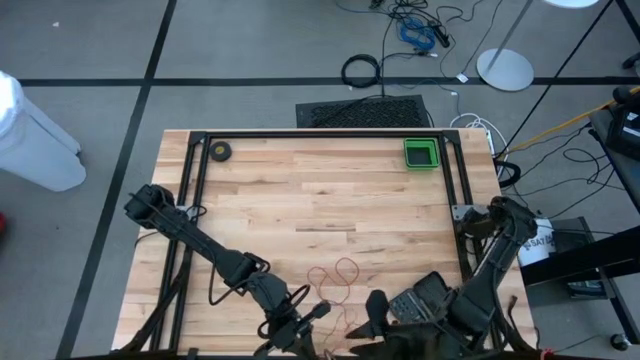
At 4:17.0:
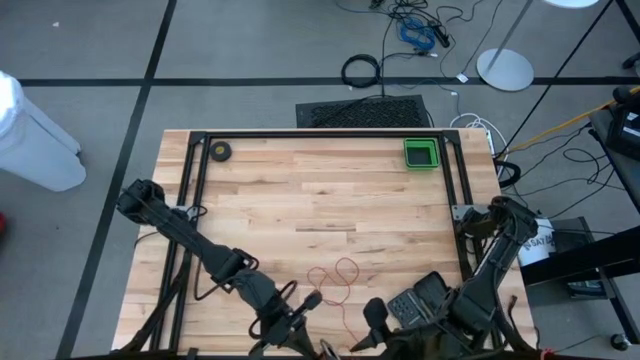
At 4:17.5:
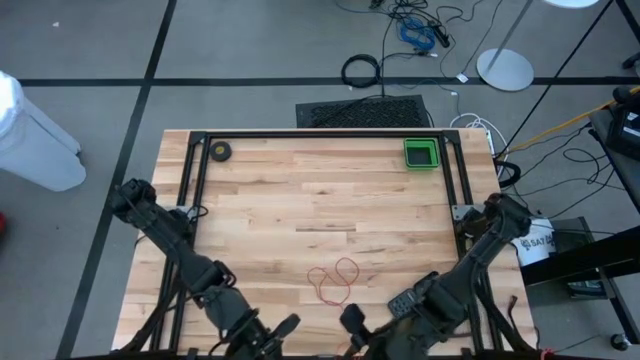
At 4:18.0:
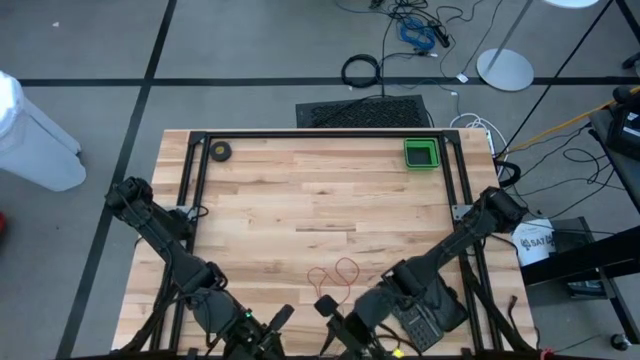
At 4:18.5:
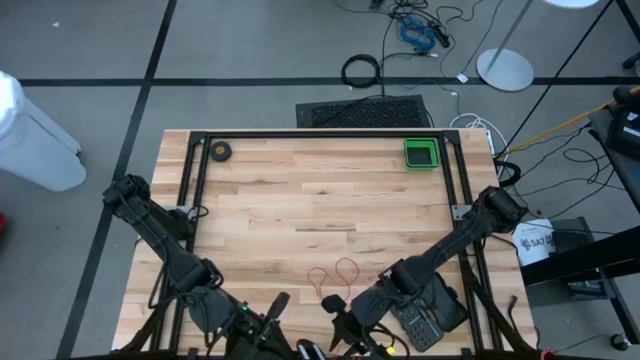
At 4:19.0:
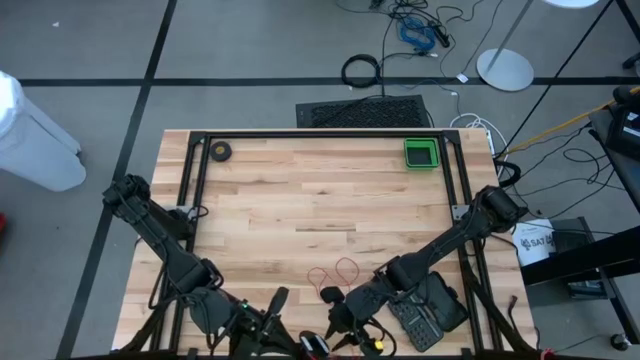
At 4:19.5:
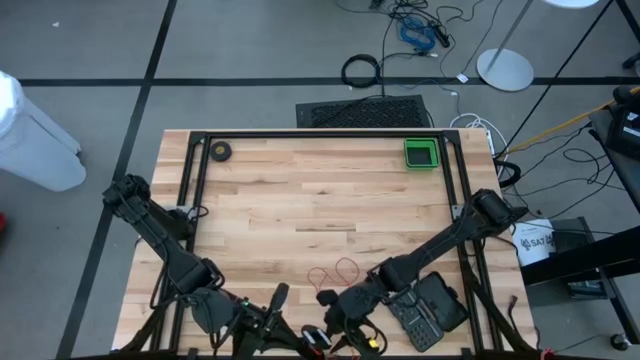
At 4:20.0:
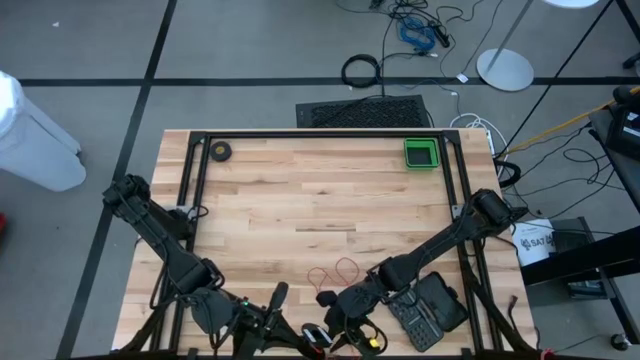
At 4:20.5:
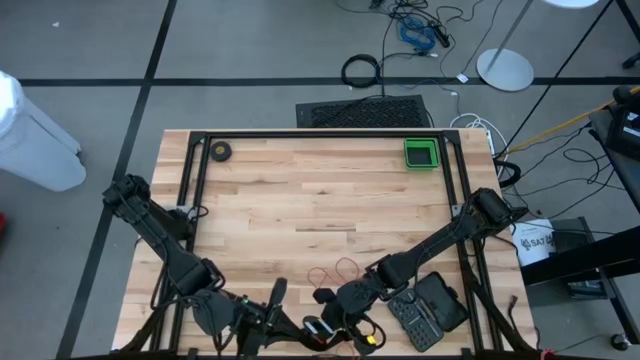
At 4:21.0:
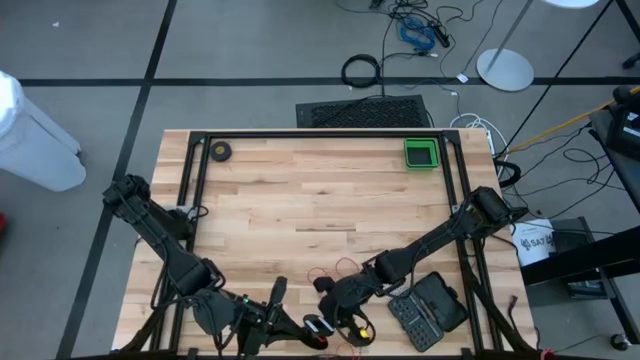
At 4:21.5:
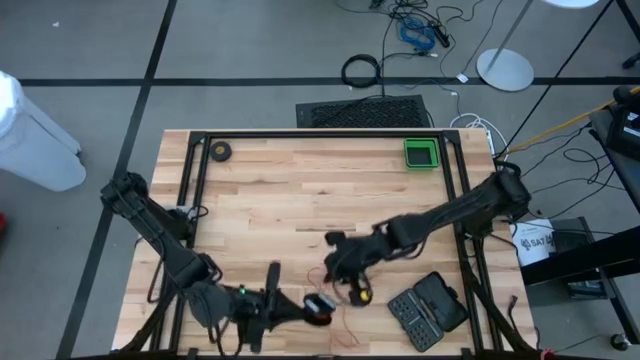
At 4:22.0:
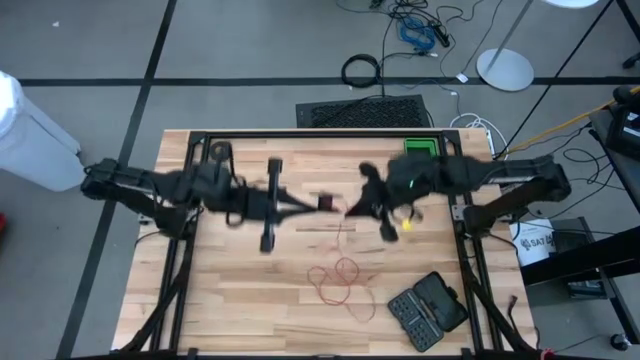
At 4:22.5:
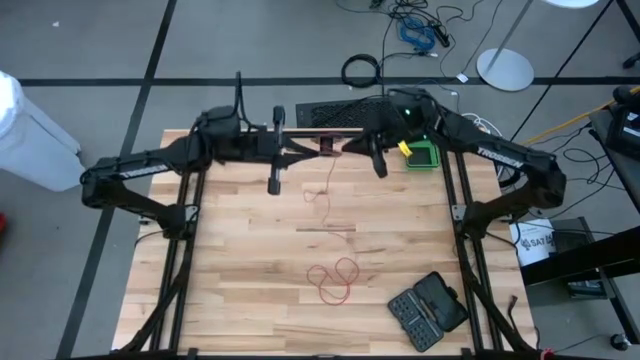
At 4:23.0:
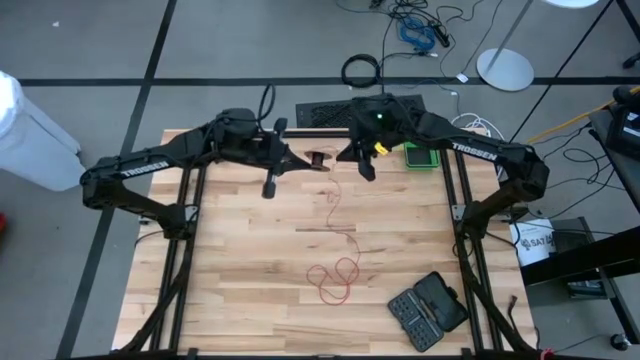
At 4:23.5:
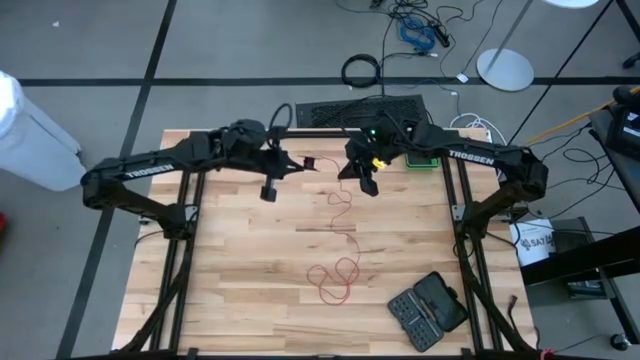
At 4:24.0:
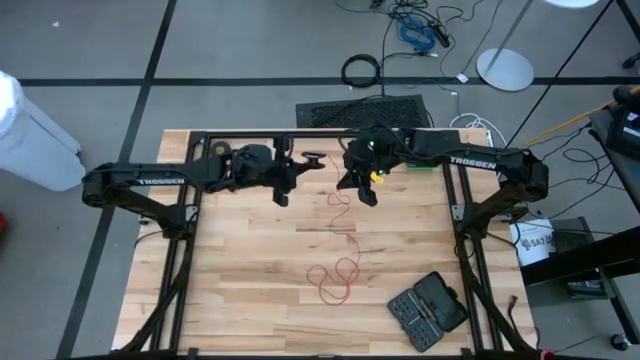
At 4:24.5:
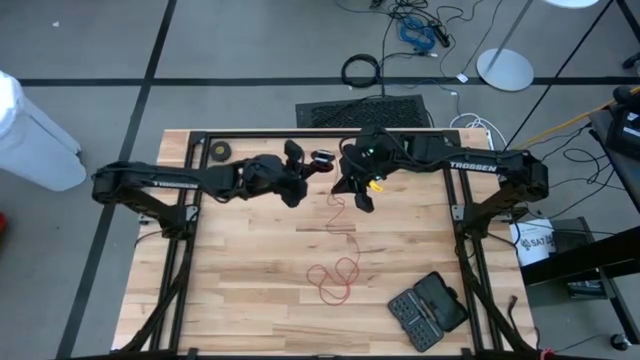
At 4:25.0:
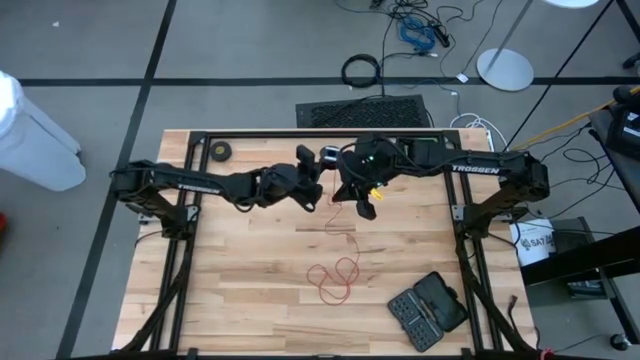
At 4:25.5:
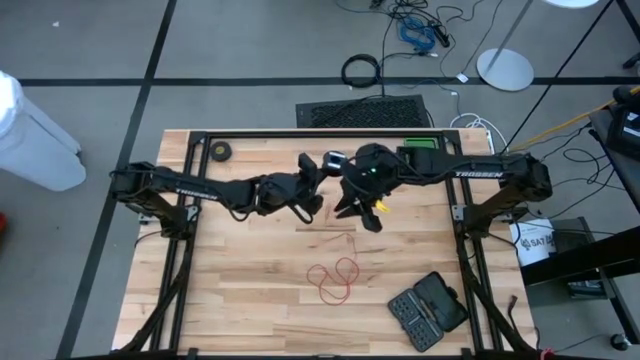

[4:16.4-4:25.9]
Task: Coil cords
Coil the red wire into the spool

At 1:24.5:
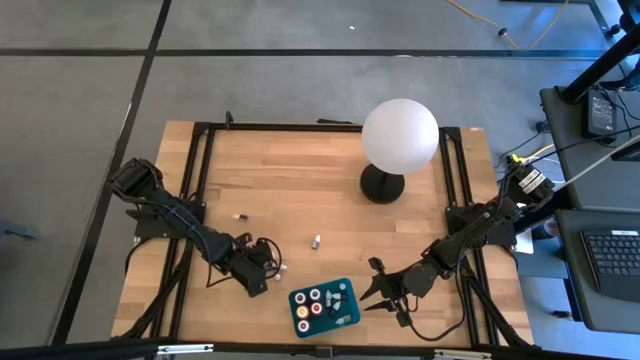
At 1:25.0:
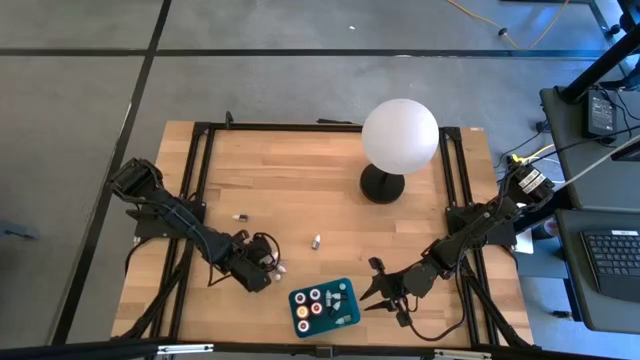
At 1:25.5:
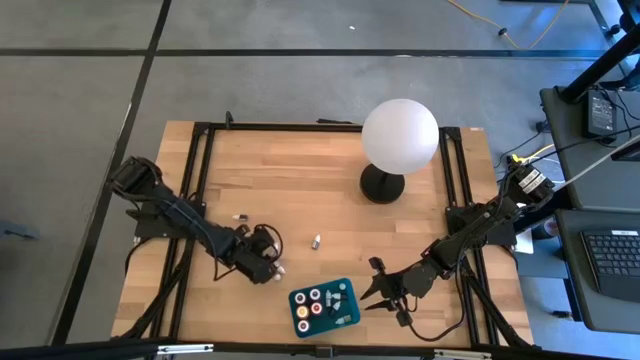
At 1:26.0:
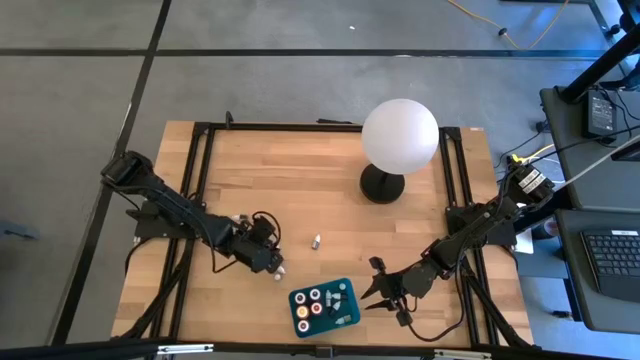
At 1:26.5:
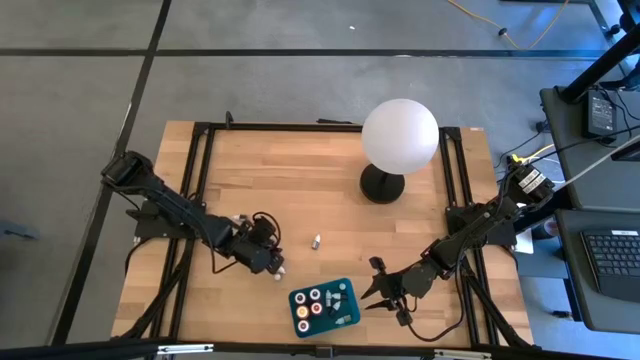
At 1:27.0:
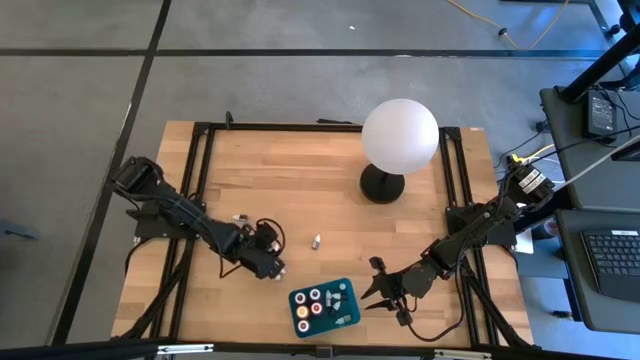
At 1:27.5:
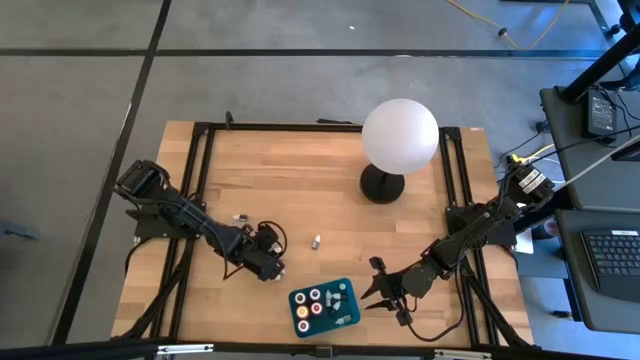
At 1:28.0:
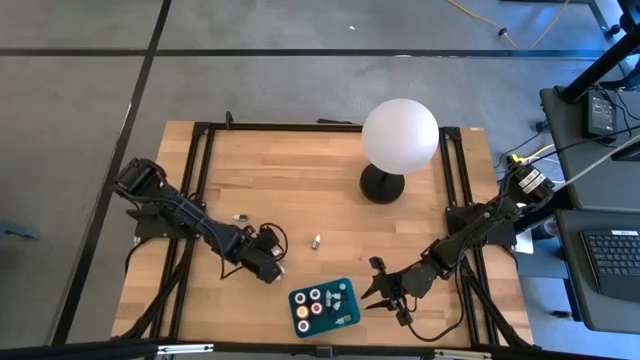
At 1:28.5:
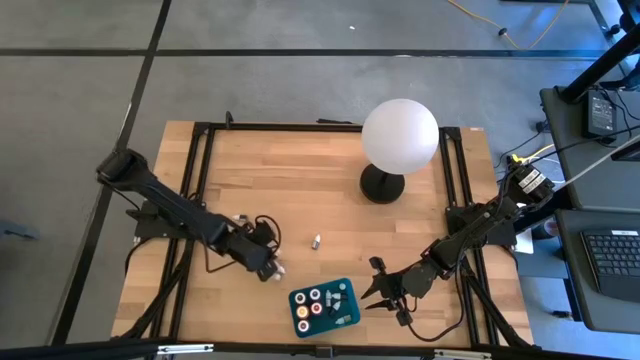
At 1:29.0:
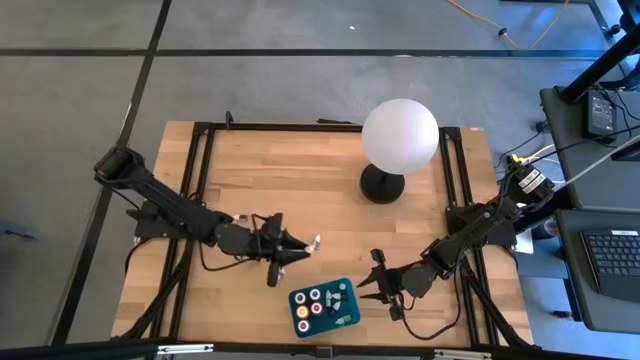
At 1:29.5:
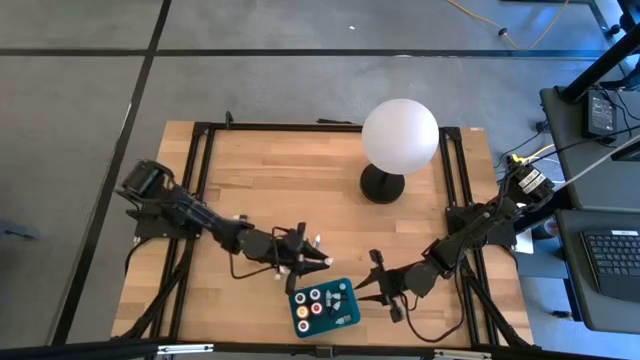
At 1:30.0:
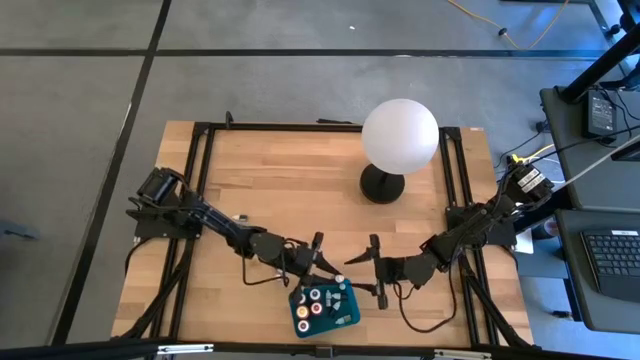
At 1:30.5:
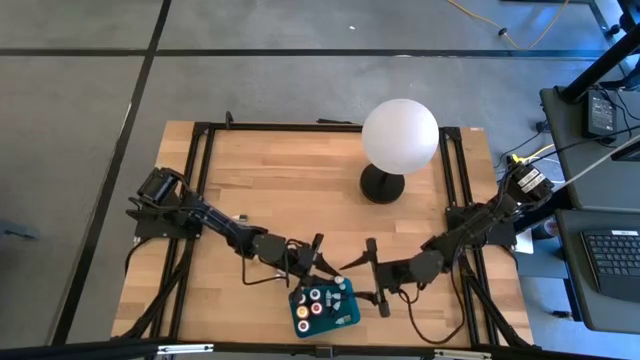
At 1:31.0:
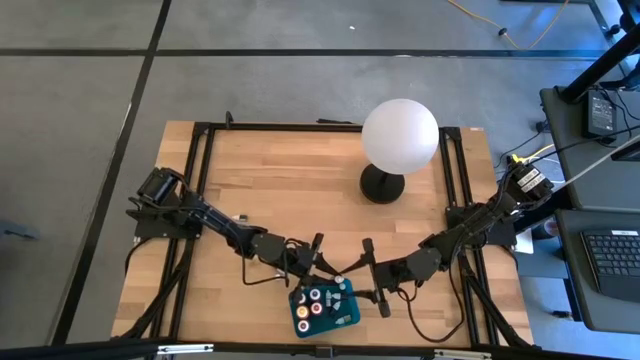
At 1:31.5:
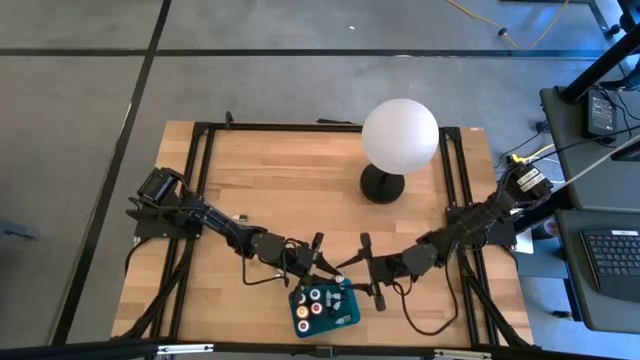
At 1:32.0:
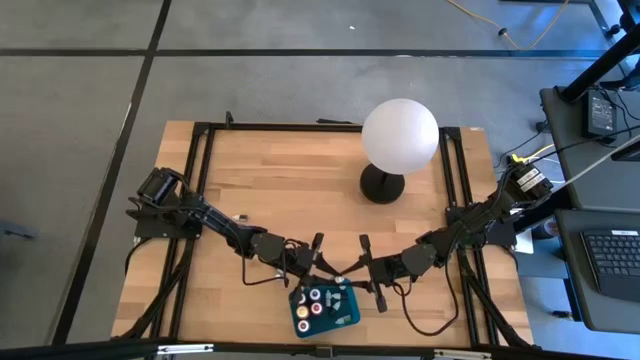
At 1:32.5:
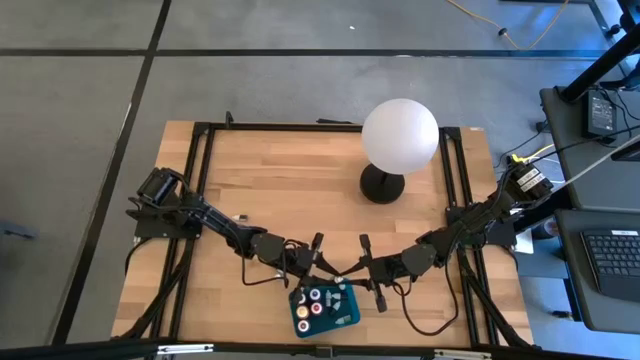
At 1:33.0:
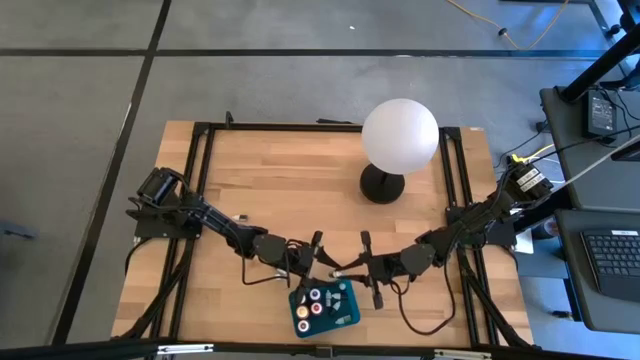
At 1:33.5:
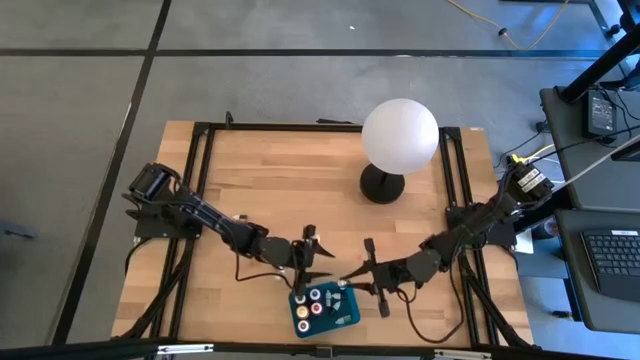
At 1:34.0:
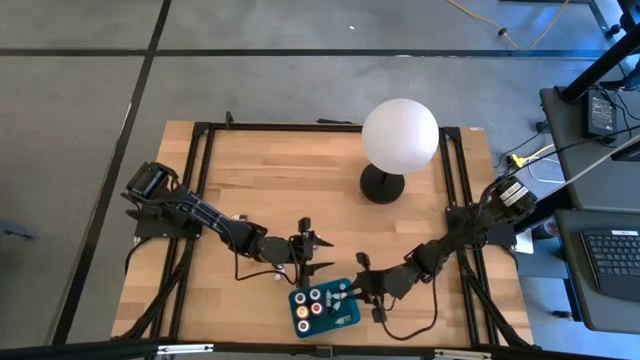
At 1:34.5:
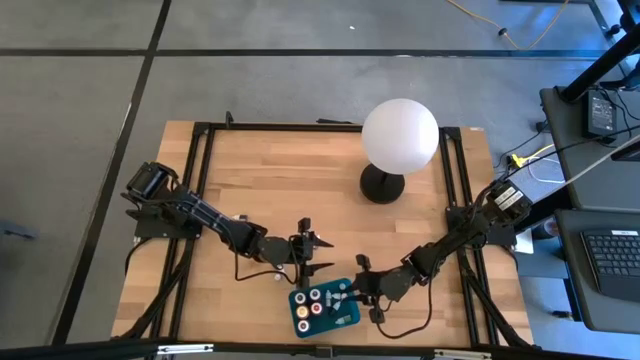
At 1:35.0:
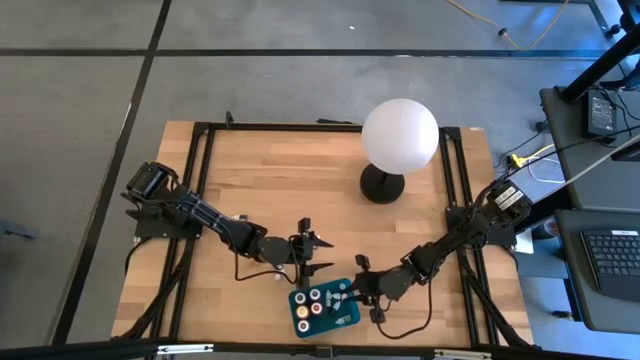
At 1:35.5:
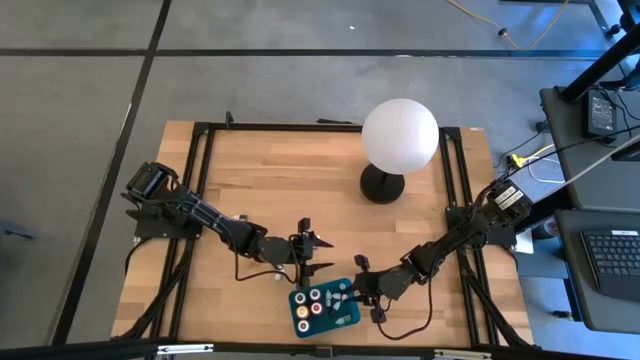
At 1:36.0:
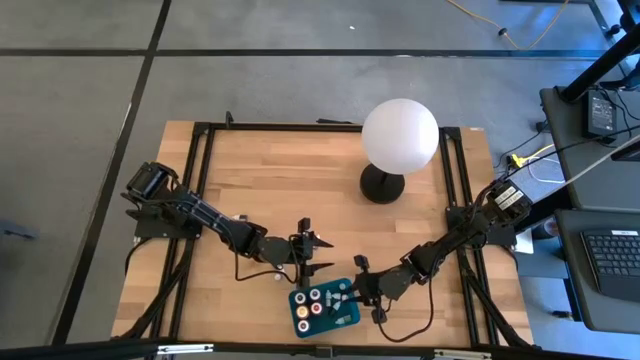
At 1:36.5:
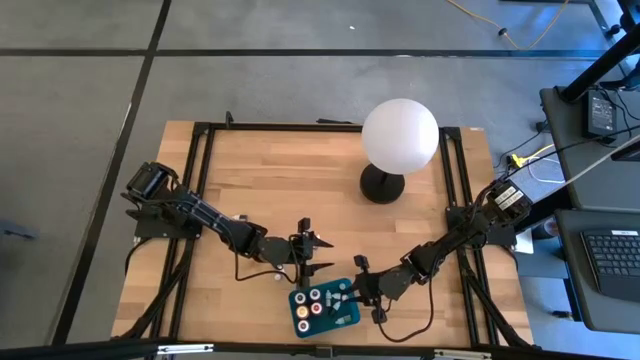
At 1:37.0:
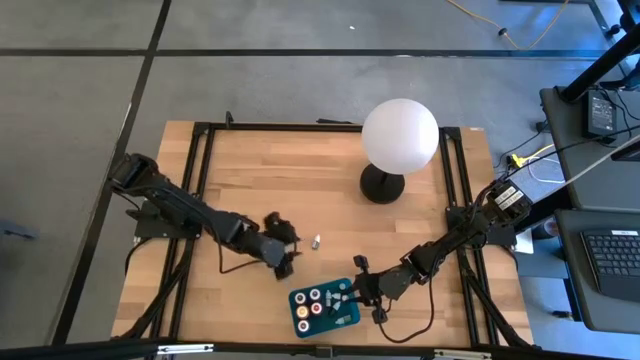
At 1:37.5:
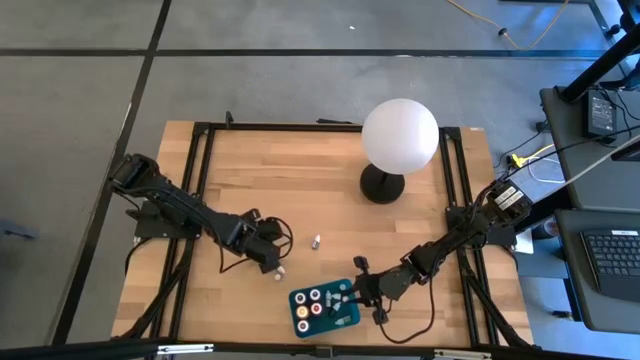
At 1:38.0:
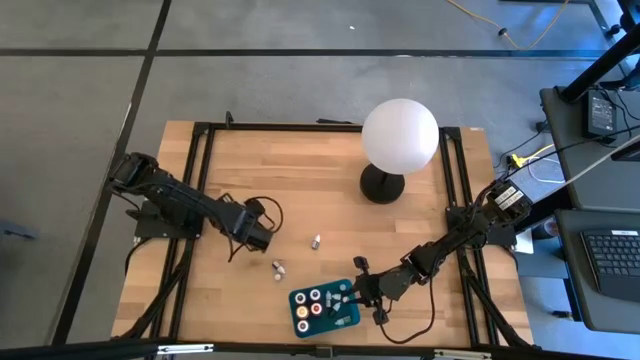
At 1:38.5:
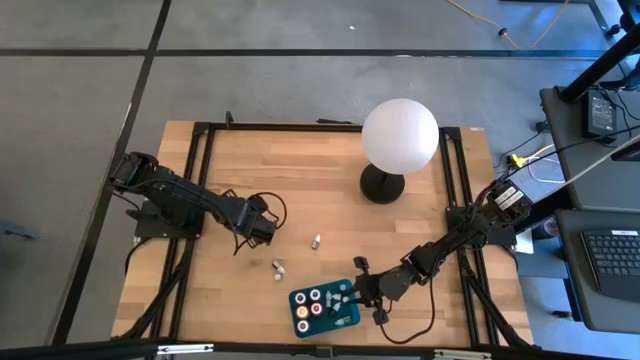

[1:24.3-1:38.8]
Task: Pick & Place food coloring
Put the small green food coloring bottle into the blue bin
